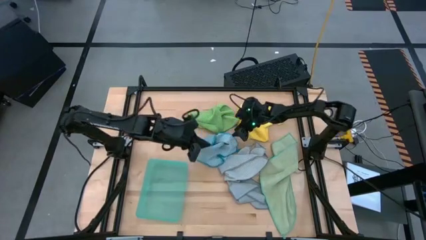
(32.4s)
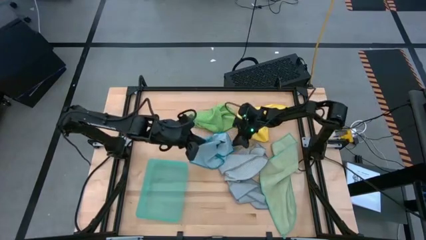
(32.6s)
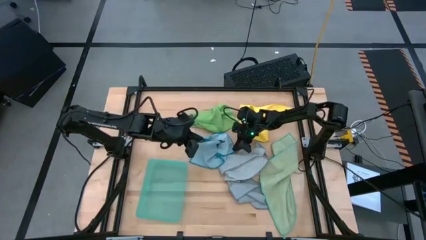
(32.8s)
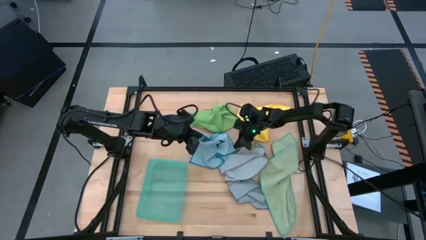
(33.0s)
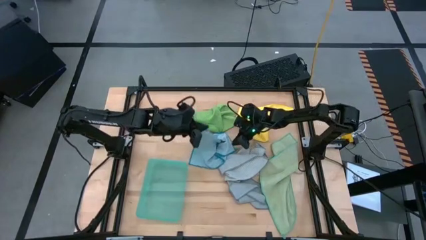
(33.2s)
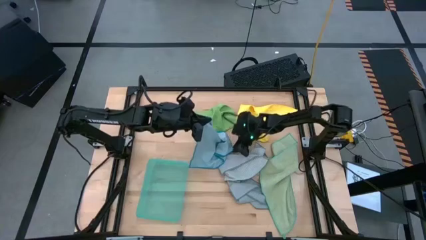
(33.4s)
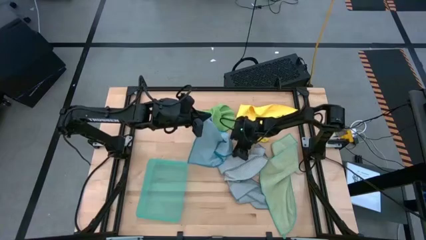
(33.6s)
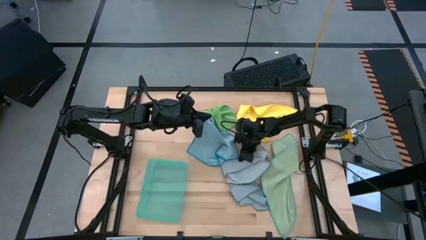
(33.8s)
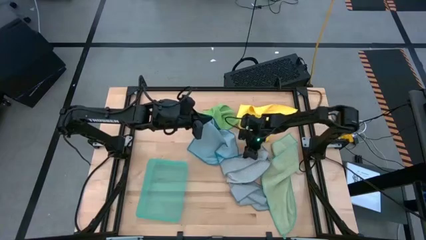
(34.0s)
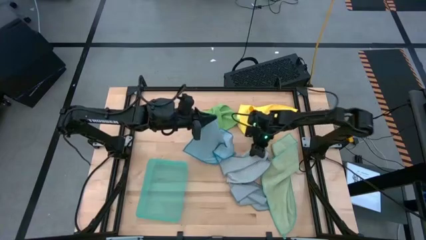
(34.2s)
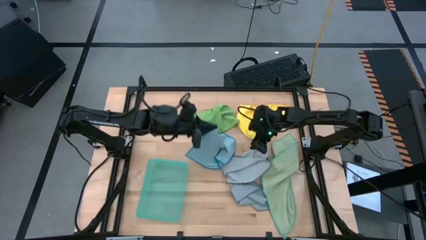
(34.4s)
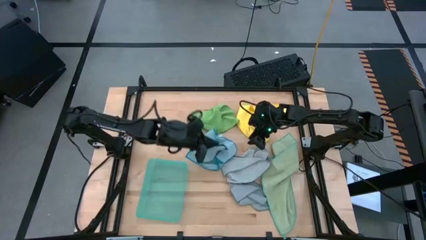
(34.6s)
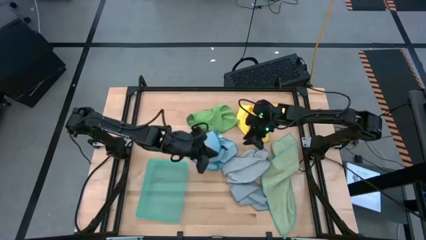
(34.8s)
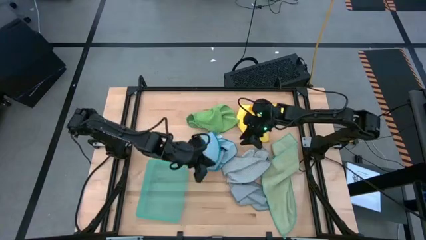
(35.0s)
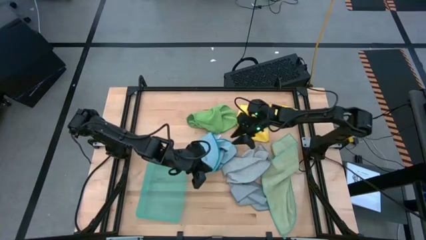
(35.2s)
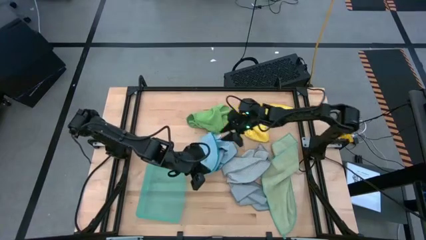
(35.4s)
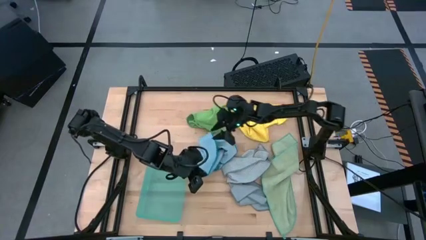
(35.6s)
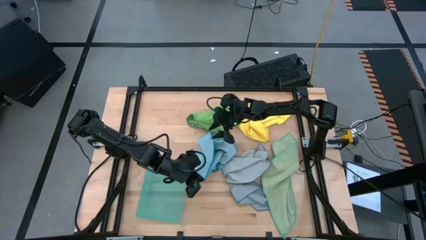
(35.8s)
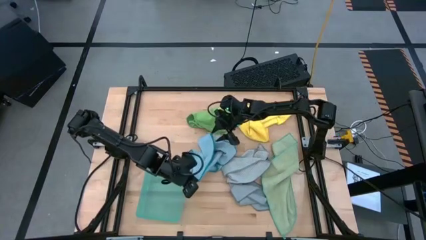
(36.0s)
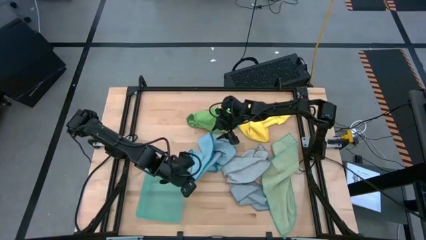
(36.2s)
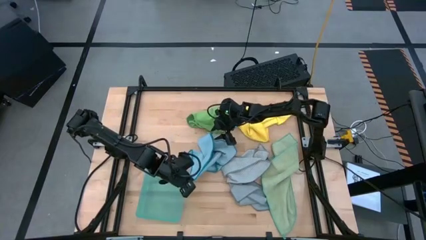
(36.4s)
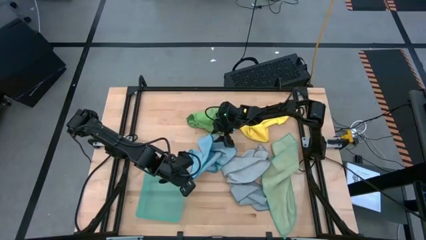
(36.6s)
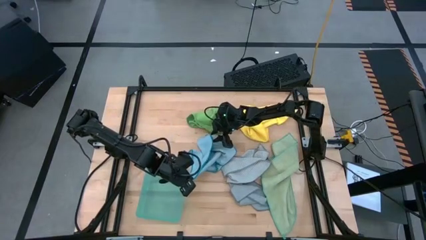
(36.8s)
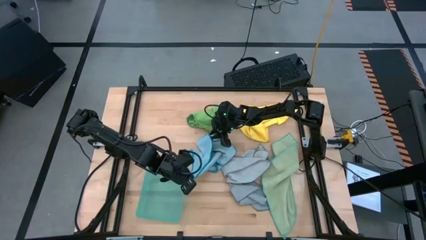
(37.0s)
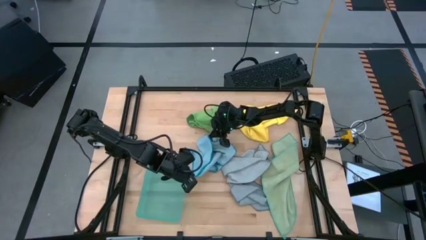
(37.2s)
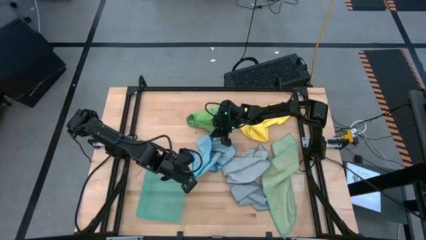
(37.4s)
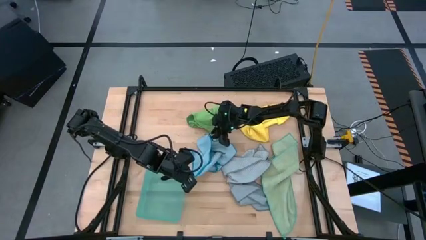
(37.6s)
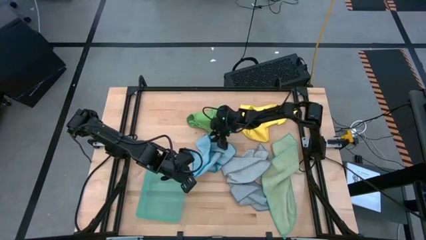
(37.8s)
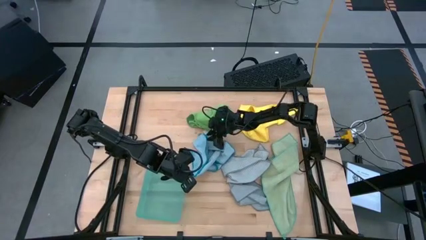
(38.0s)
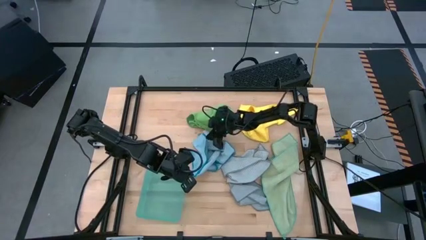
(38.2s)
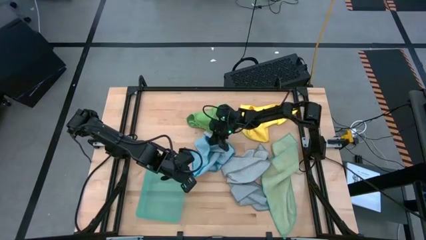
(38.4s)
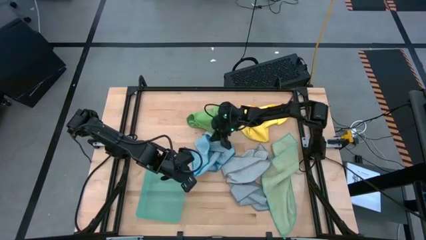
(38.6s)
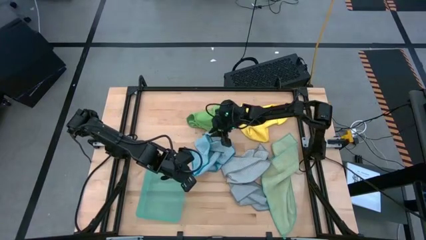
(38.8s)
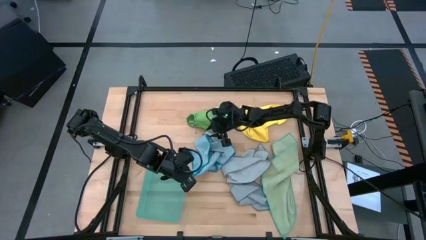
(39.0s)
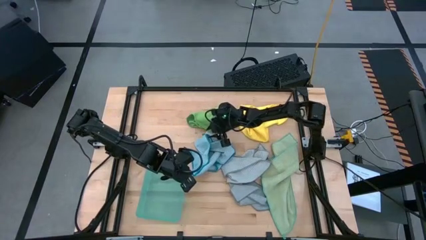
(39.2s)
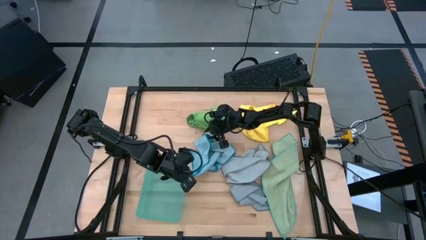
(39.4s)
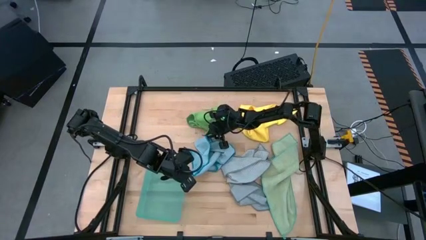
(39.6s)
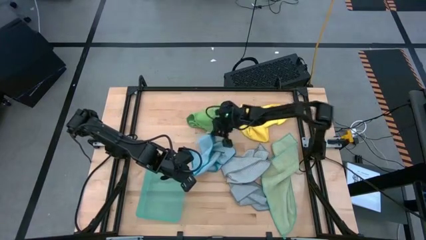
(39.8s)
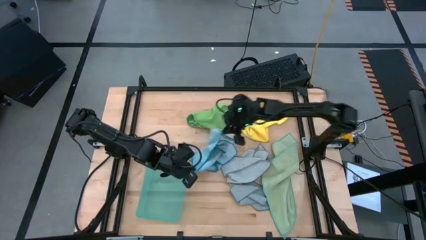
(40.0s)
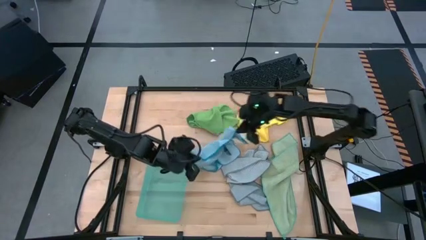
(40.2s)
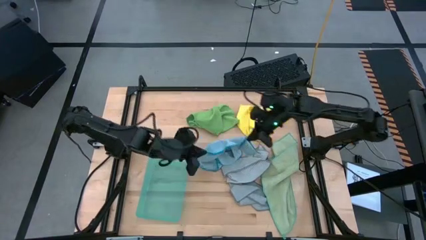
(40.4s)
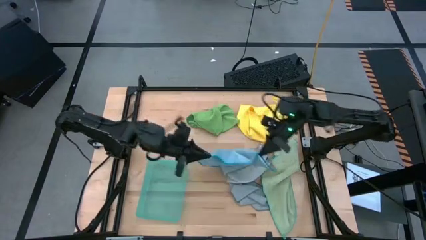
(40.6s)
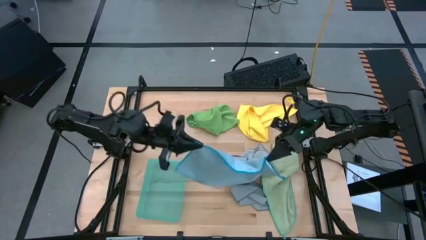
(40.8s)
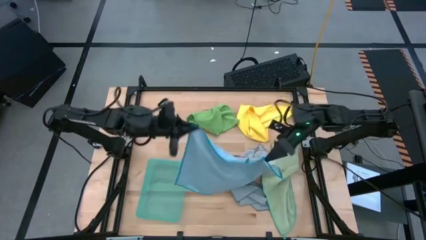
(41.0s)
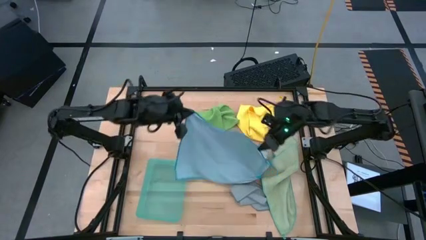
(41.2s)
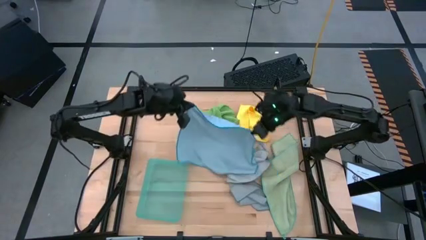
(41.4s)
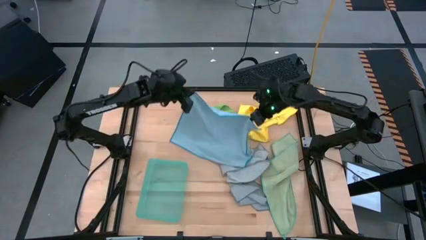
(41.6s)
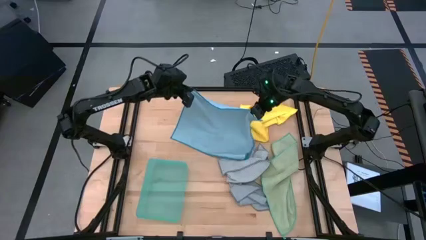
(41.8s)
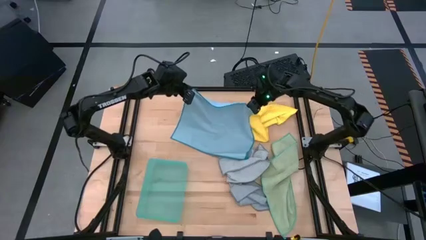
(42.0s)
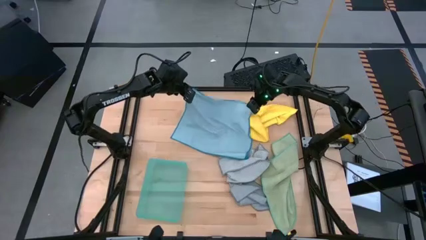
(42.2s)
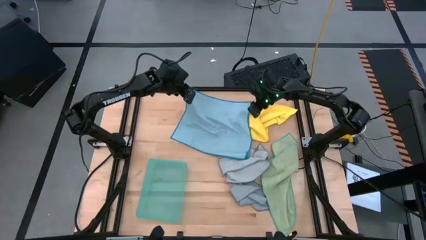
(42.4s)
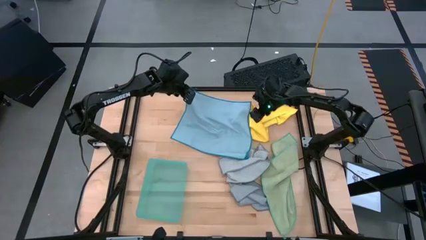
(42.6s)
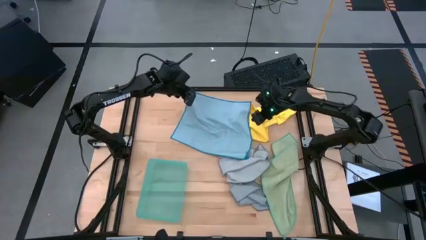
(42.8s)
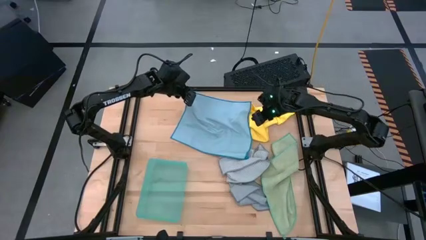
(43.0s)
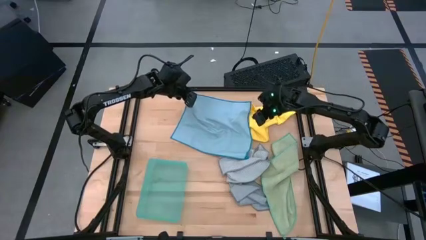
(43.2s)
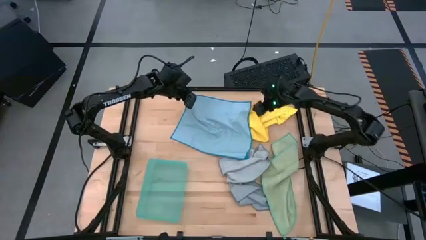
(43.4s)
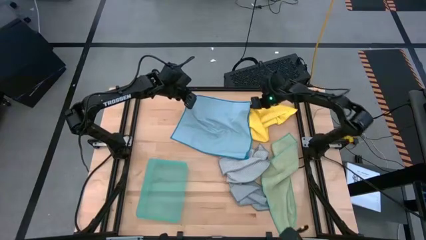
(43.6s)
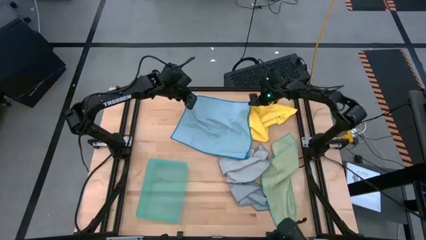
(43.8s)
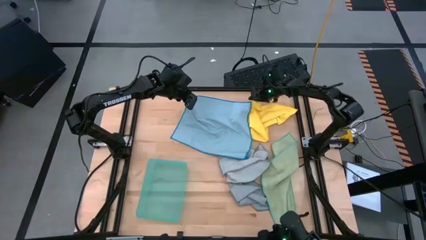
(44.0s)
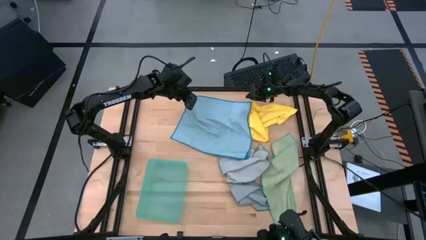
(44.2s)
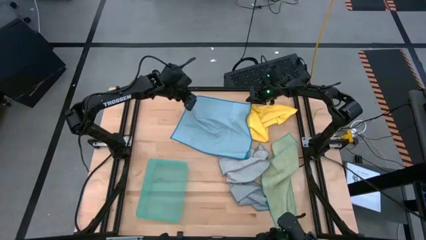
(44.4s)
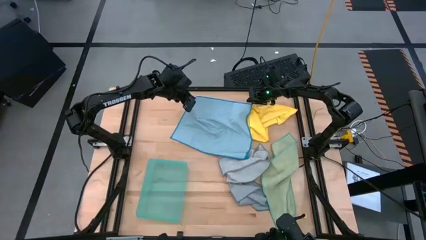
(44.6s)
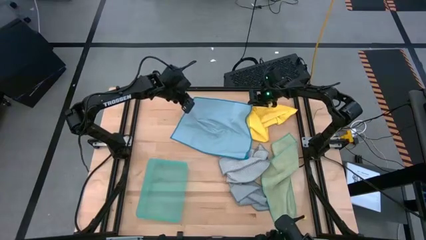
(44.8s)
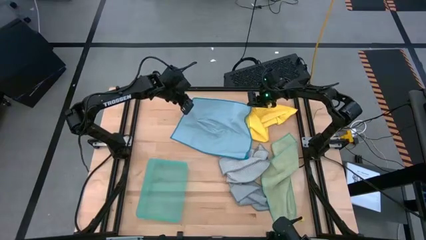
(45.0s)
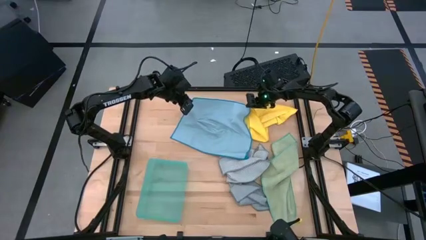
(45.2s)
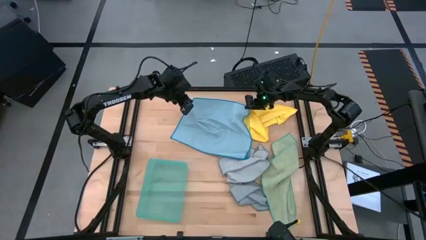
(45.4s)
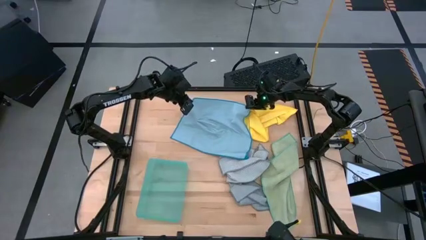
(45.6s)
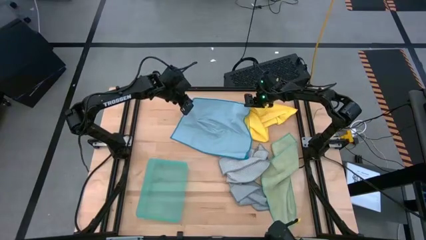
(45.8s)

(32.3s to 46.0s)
Task: Fold microfiber towels
Fold the blue microfiber cloth

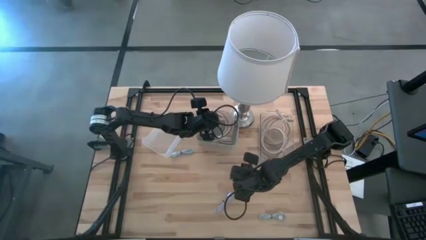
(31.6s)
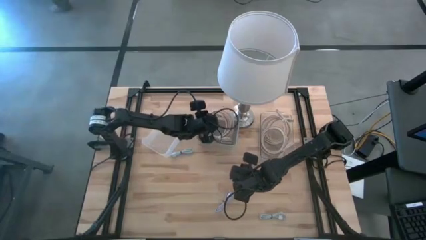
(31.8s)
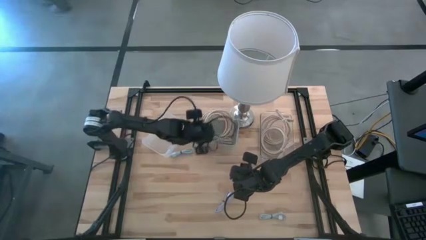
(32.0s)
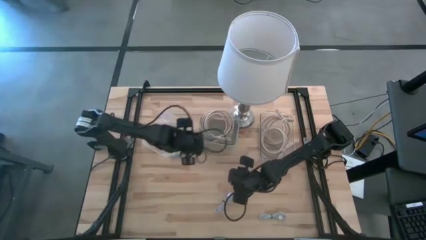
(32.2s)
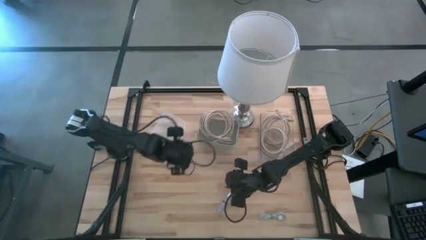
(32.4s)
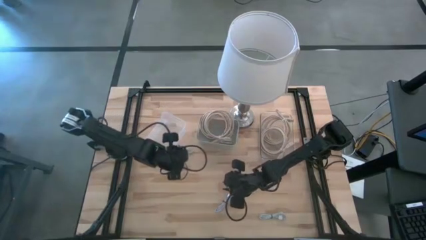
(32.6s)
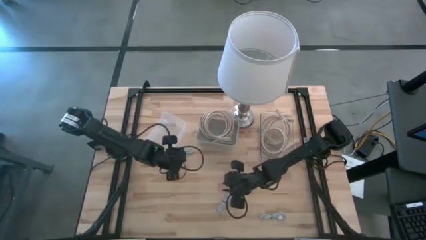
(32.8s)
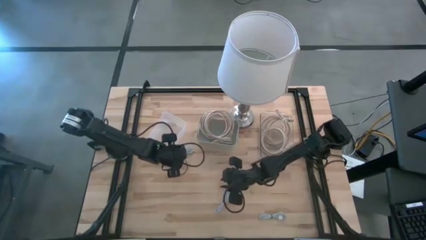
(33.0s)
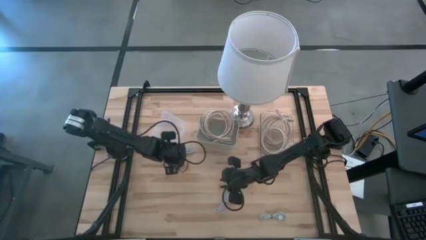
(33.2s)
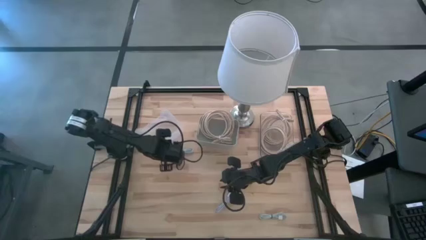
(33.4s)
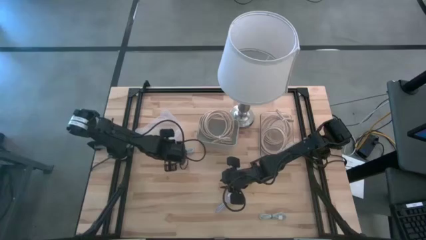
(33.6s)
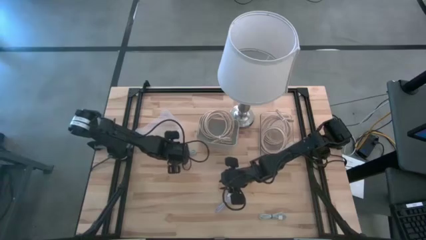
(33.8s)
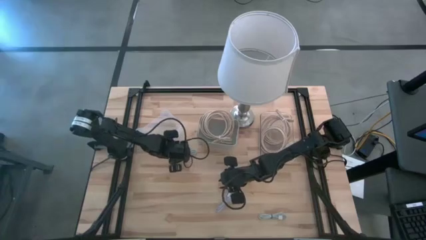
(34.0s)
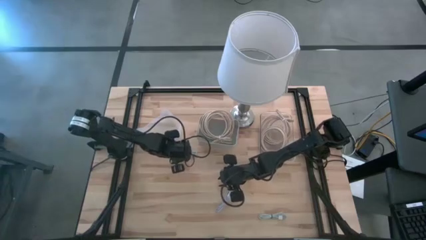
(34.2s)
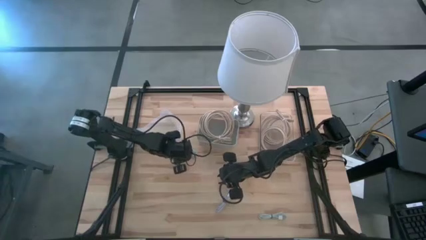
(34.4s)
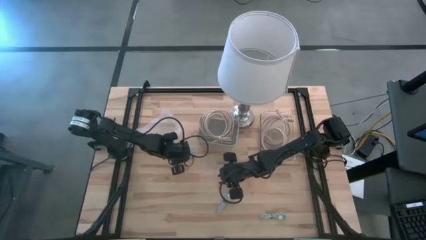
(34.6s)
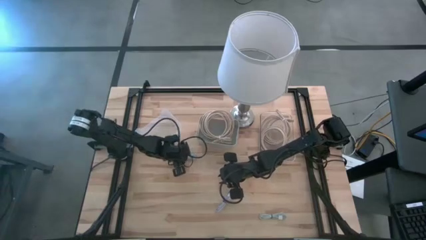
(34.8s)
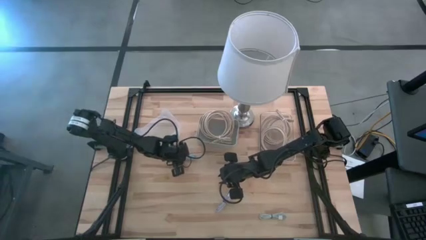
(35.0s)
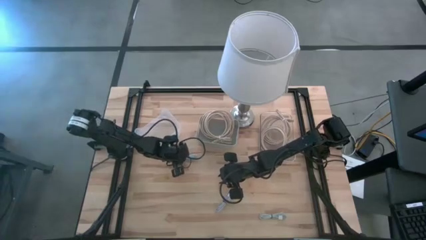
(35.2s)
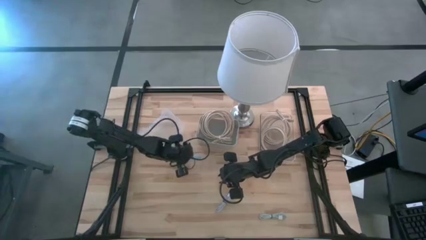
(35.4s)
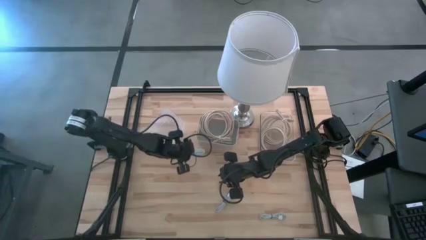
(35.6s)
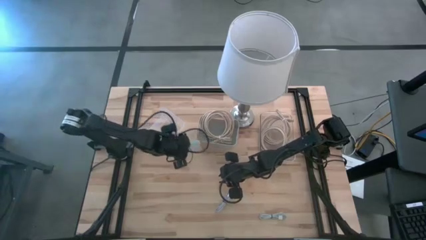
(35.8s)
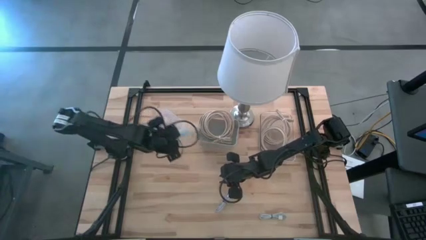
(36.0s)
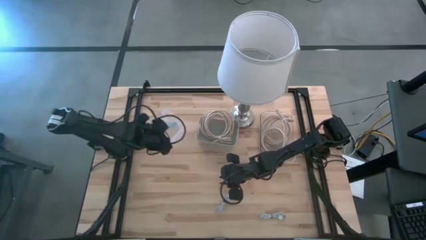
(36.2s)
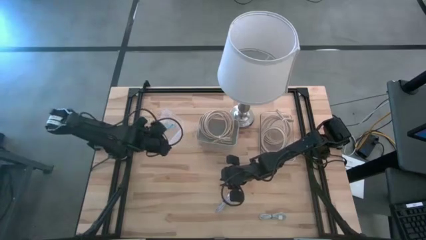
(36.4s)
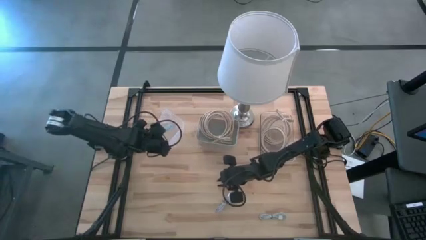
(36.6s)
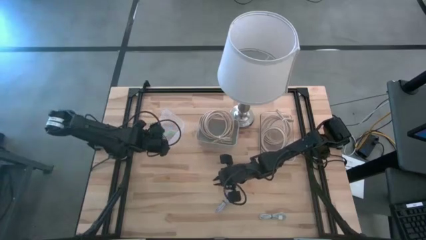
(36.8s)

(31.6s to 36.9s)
Task: Pick & Place USB Port
Put the blue USB charger cable into the white bin
